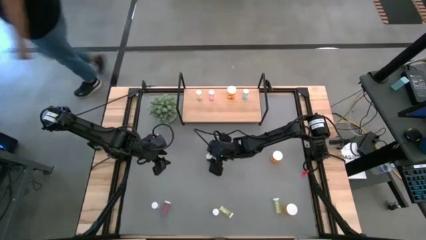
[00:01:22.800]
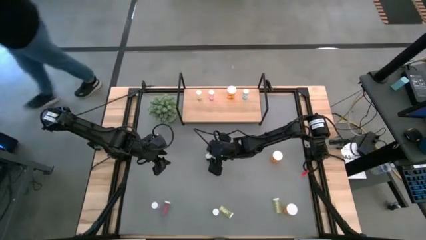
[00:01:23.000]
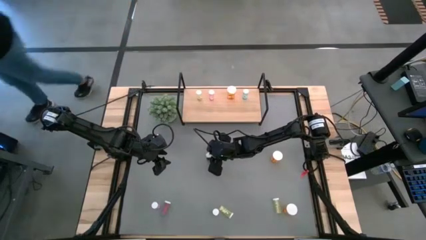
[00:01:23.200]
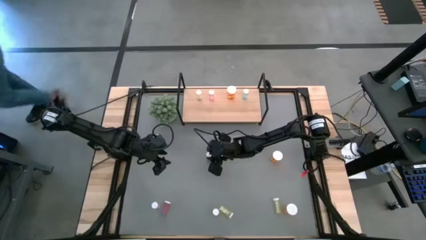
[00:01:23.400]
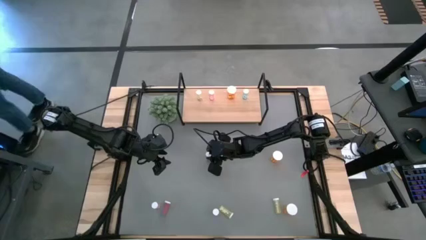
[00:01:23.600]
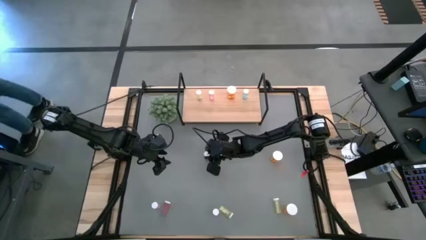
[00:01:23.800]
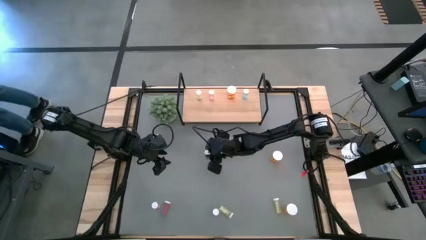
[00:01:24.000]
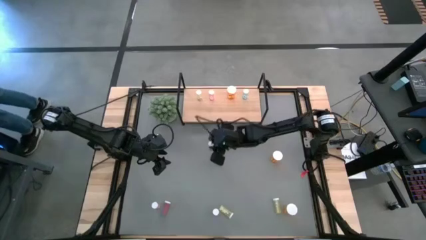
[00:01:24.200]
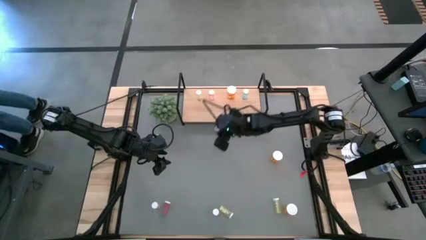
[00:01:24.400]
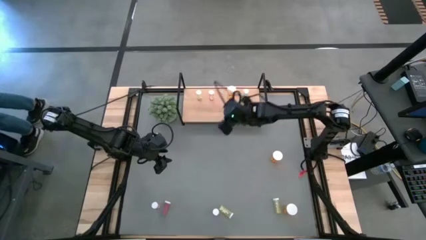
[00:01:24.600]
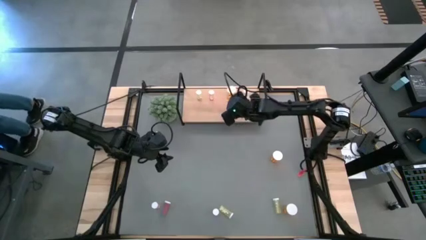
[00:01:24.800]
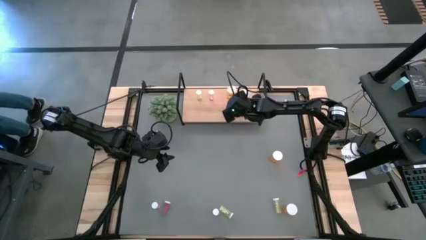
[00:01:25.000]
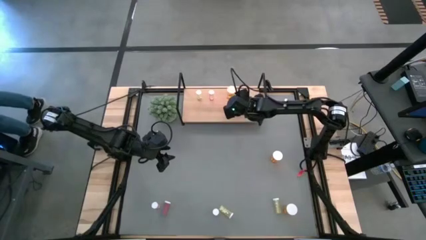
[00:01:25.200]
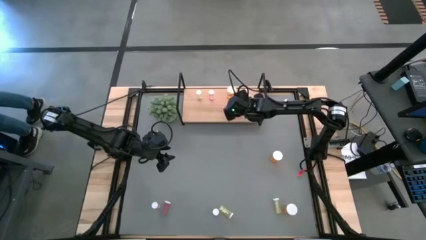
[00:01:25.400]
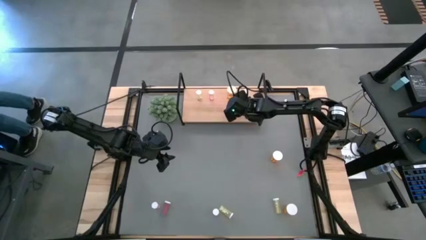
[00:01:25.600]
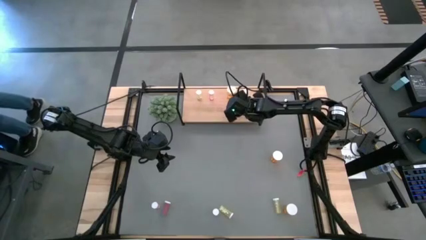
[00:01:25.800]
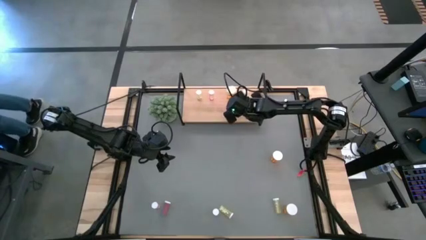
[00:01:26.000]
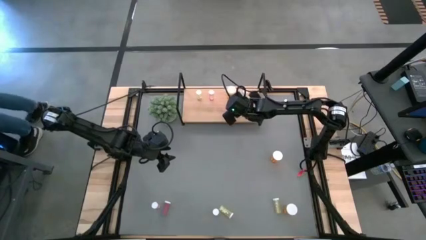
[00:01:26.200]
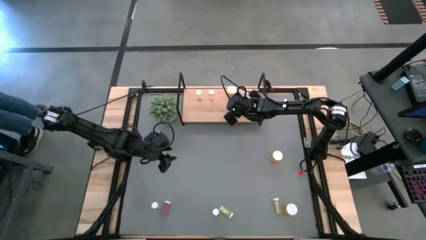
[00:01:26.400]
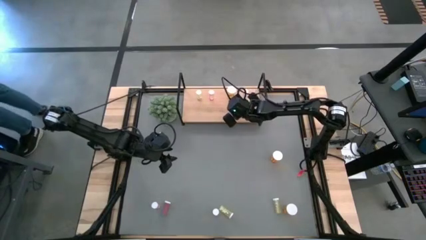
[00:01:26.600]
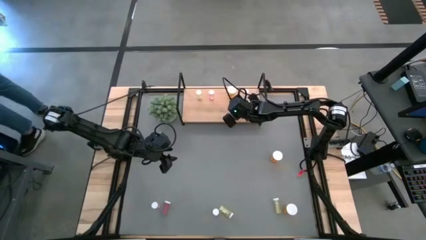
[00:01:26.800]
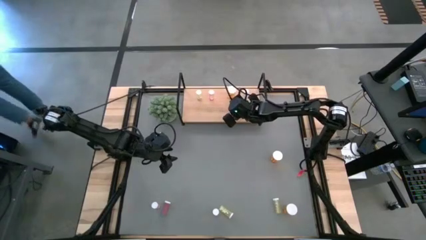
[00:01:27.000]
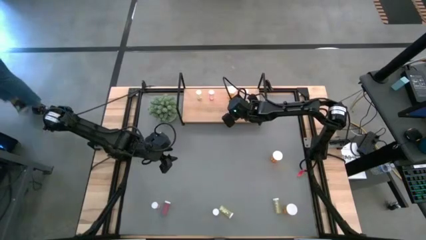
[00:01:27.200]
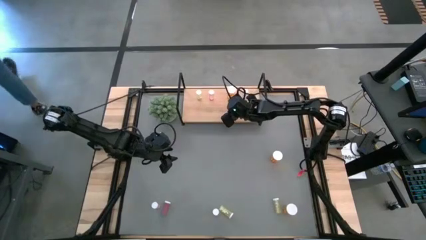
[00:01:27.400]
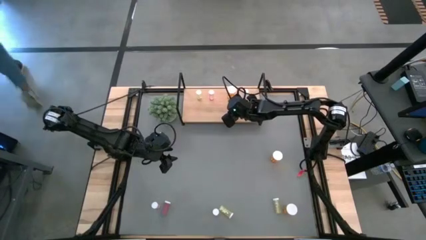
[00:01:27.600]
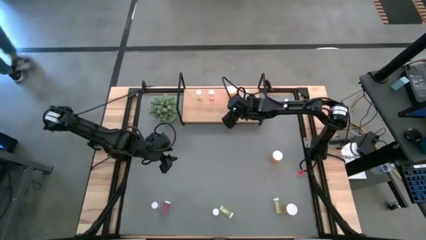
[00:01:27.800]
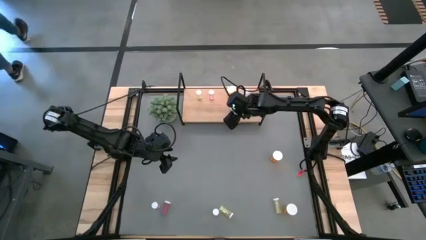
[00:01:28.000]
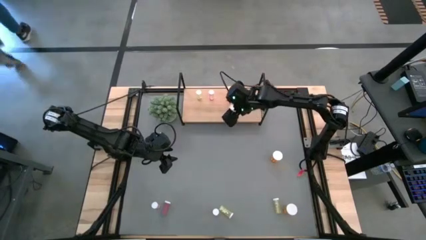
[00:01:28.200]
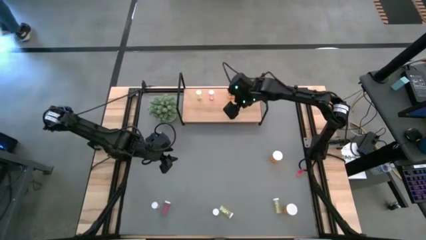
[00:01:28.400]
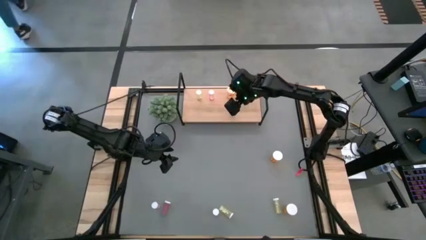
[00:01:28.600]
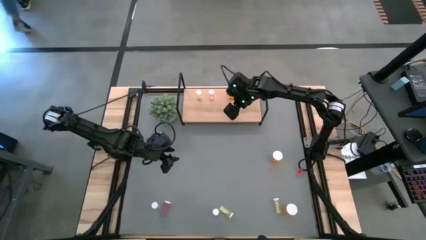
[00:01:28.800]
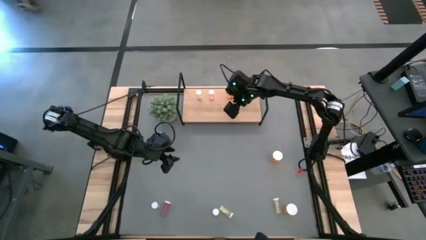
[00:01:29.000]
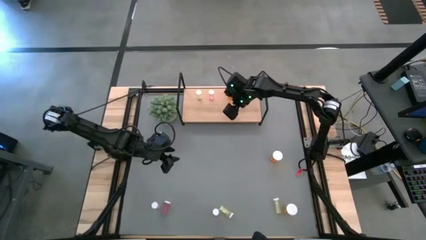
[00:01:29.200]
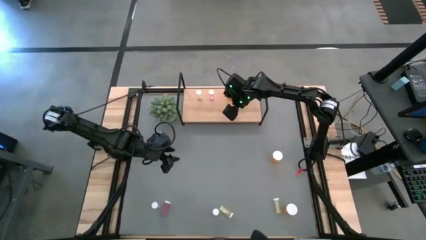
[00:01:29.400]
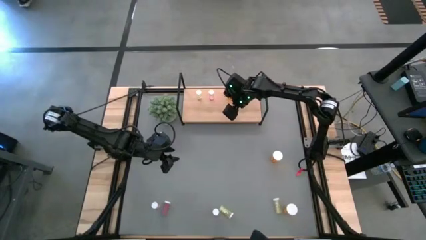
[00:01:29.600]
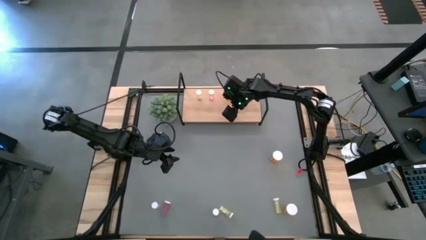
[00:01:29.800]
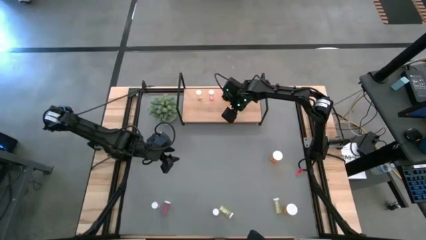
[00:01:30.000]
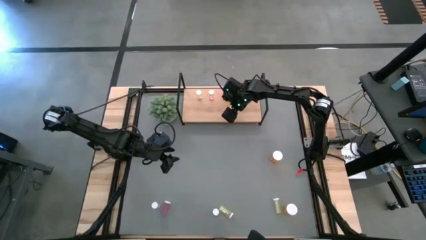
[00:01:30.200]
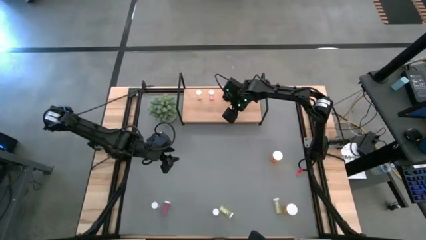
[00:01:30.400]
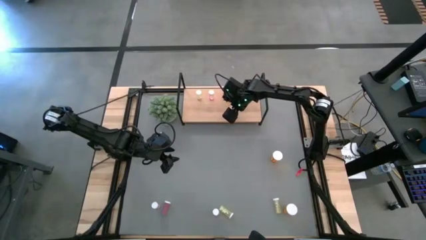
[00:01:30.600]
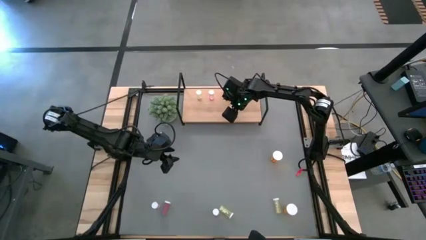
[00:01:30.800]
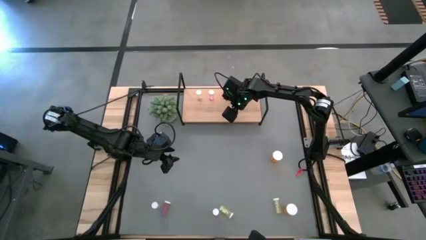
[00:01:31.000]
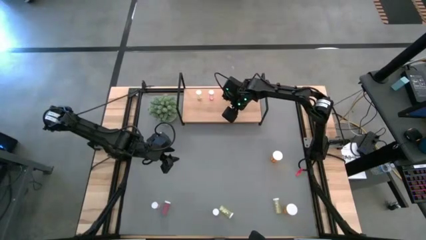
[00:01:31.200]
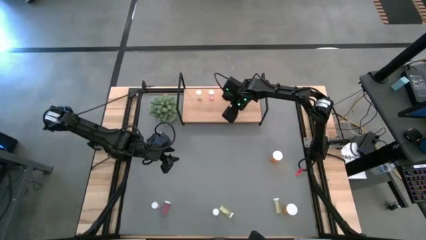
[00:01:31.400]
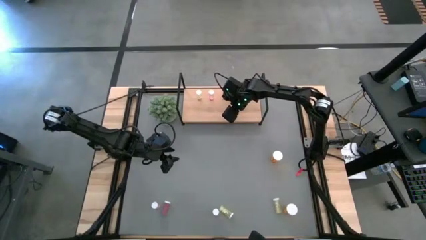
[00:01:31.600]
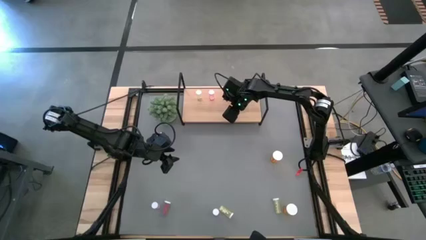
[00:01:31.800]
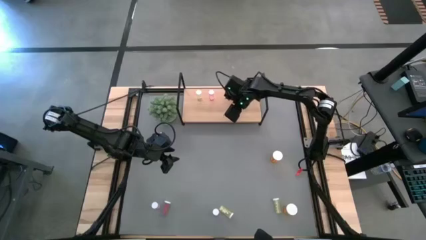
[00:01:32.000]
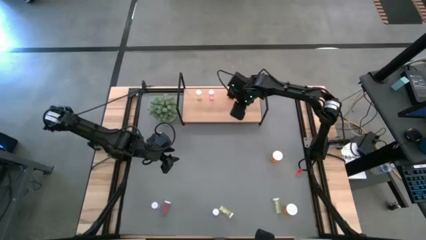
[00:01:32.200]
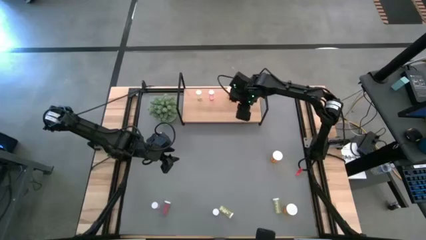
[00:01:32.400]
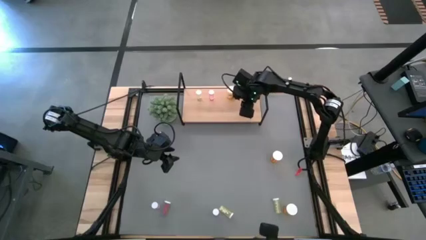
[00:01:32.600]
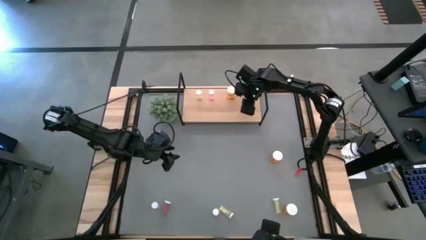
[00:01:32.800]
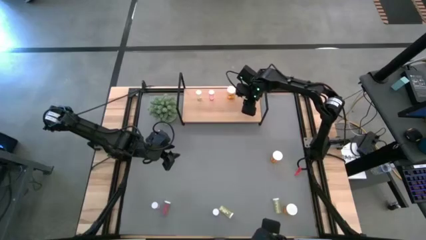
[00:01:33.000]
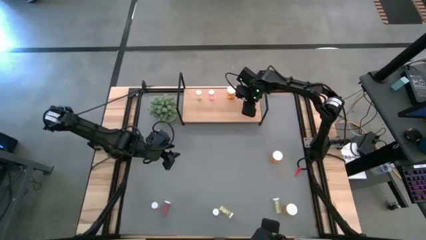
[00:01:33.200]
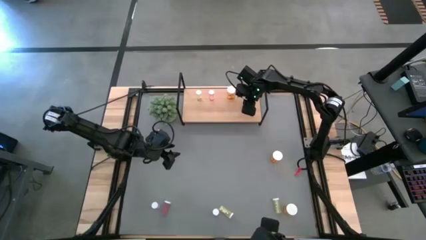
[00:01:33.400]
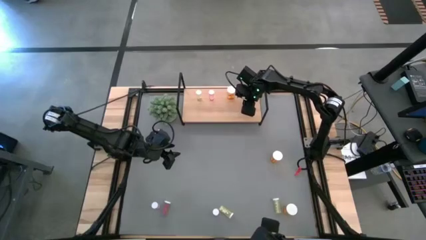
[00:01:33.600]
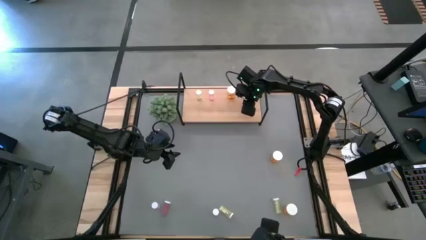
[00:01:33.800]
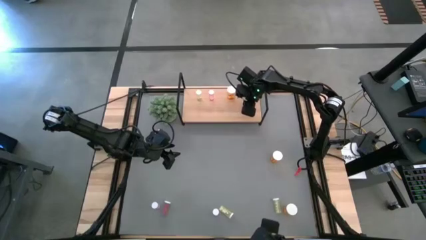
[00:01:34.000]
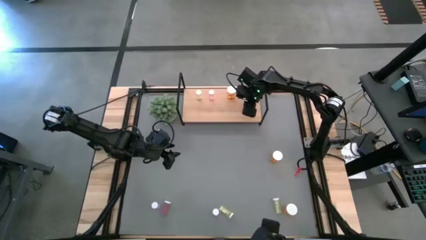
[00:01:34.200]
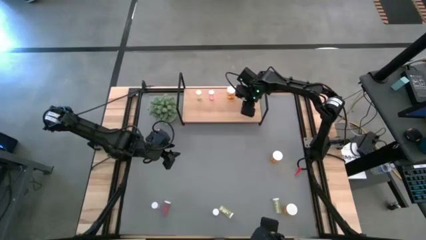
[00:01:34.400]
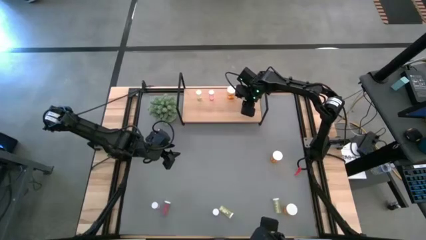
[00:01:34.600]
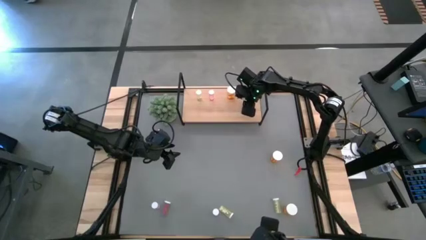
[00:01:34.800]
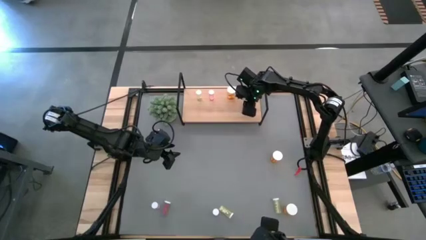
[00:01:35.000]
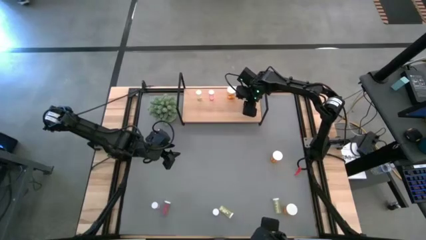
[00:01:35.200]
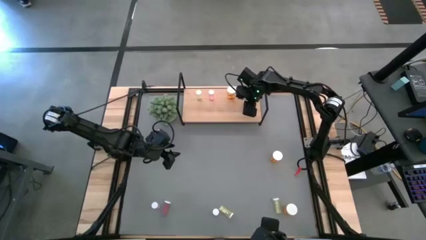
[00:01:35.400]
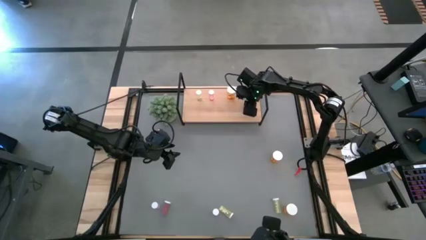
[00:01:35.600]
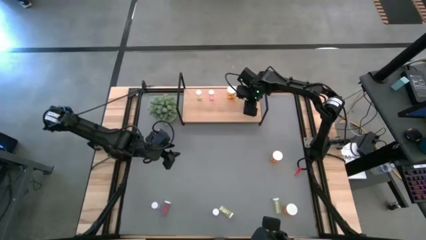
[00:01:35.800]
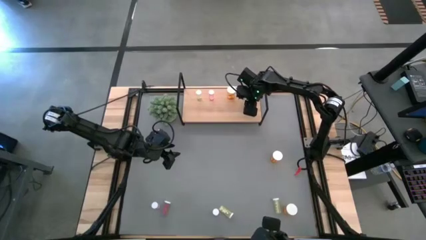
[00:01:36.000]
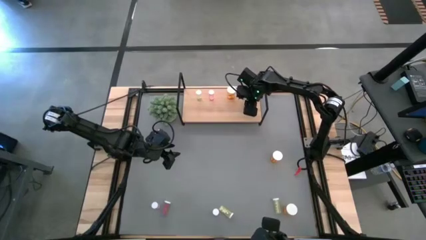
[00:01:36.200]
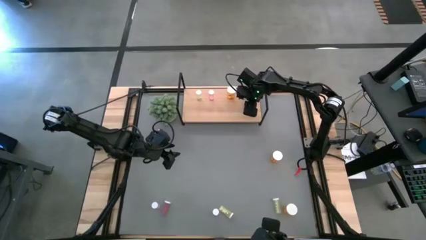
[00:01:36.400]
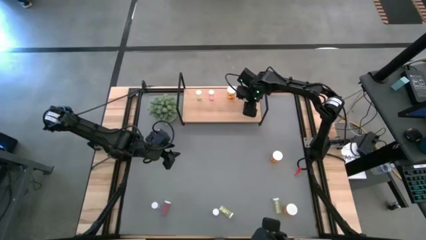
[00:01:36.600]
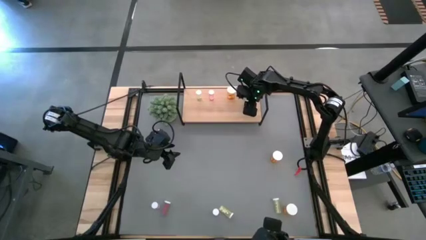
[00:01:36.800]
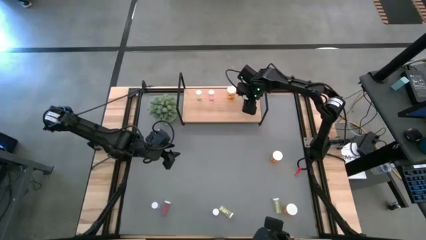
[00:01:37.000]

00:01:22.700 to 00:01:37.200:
Task: Pick and place medicine bottles onto shelf by color
Put the top blue pill bottle on the shelf aligned with the other blue pill bottle

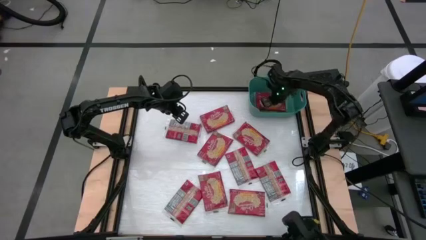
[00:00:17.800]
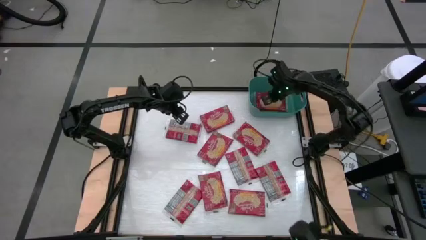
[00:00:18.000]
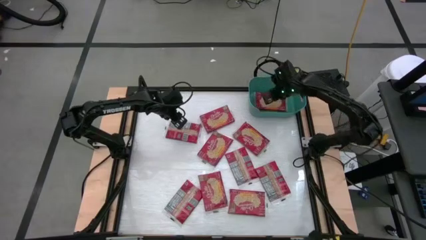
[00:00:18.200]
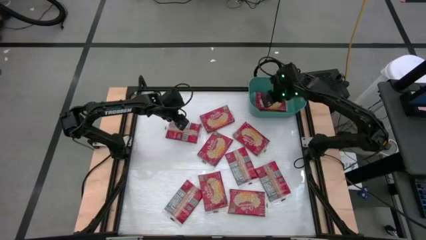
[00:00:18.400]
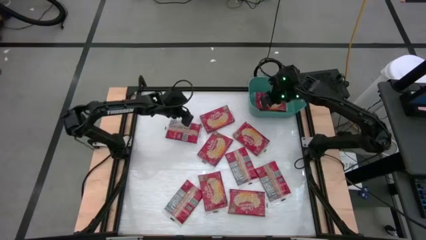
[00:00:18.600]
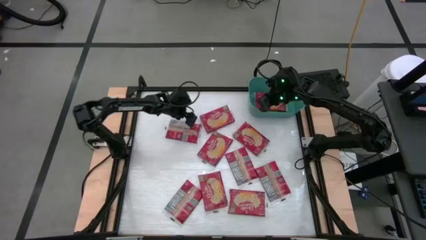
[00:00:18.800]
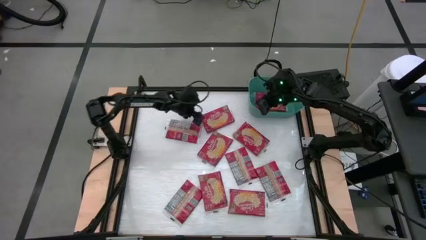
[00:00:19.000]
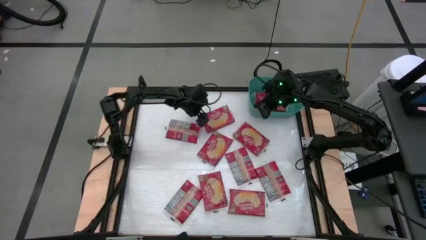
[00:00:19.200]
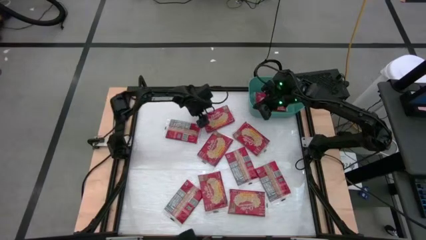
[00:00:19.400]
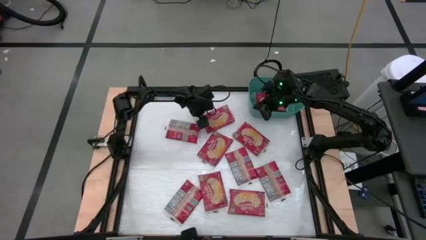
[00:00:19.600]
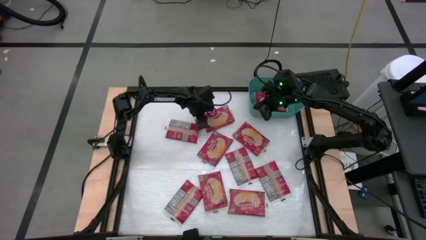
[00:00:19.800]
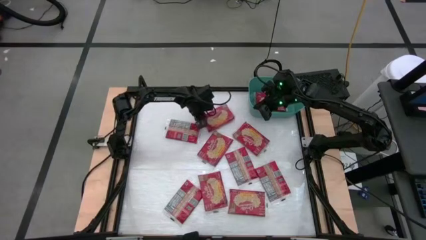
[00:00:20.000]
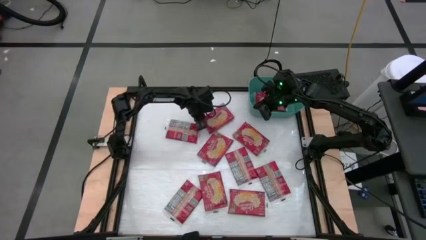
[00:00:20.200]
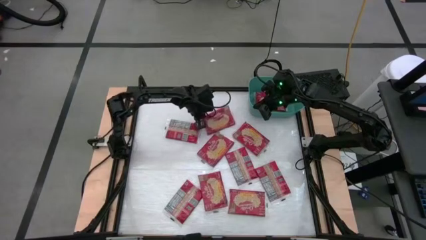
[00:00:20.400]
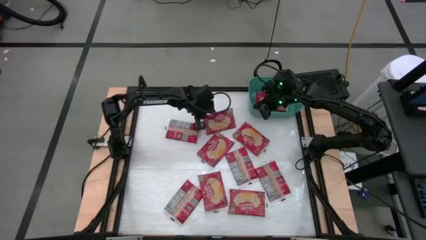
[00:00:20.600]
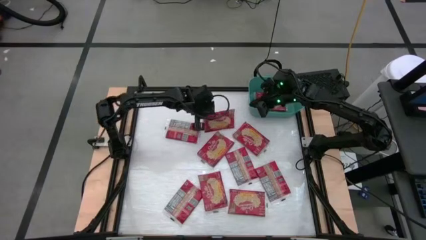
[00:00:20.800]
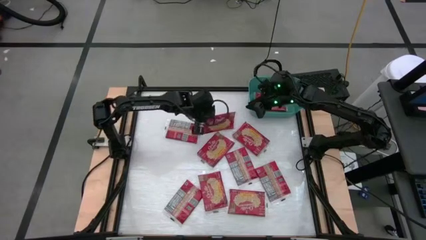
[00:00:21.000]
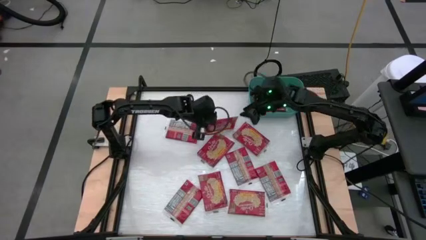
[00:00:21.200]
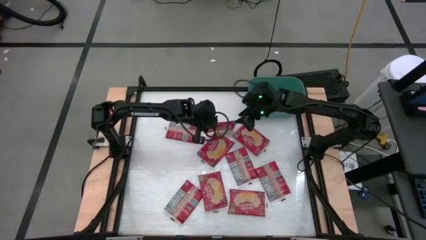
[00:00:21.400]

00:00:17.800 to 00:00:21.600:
Task: Sort popcorn bags into baskets
Put the red popcorn bag into the green bin
